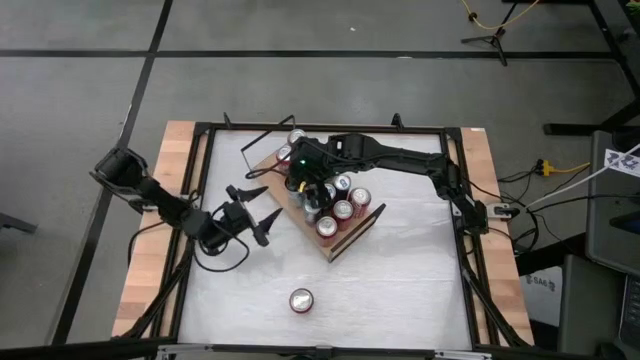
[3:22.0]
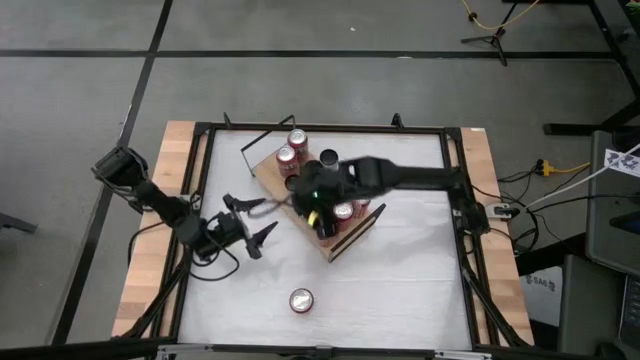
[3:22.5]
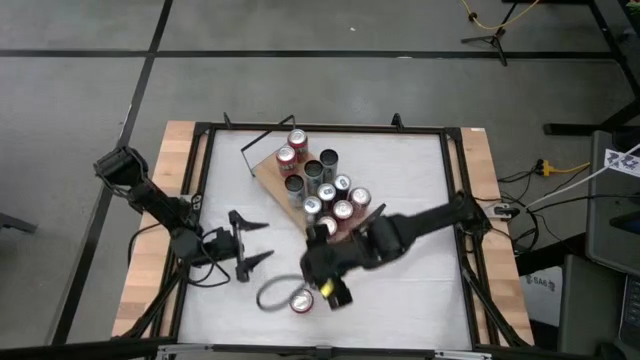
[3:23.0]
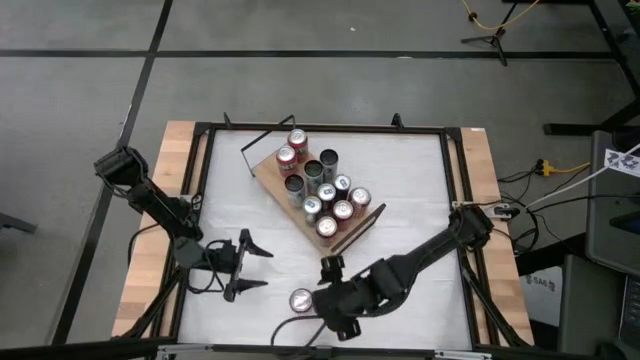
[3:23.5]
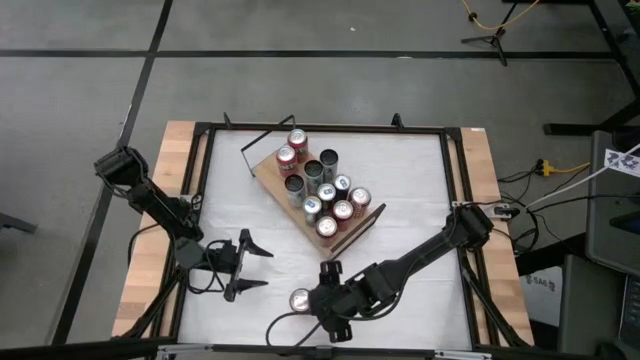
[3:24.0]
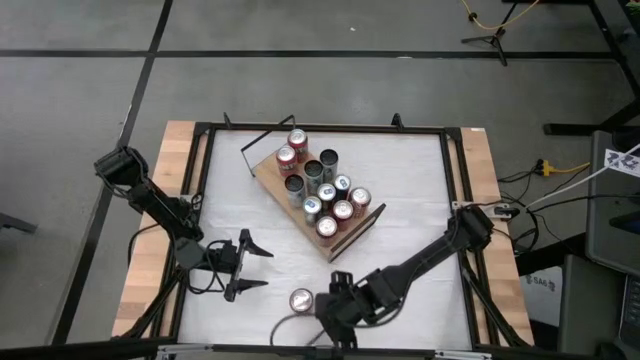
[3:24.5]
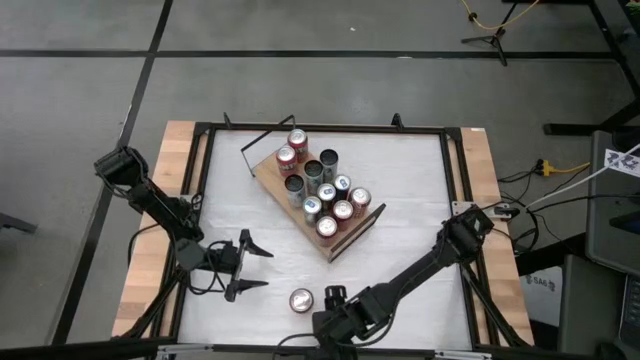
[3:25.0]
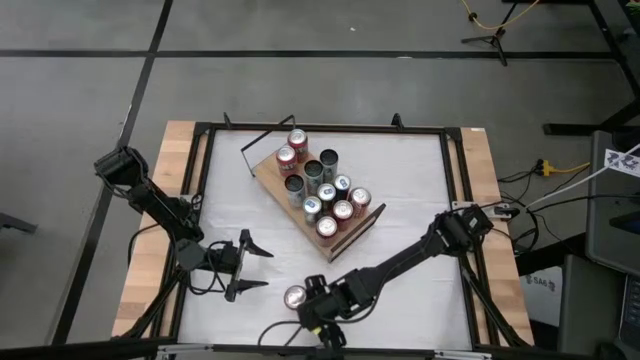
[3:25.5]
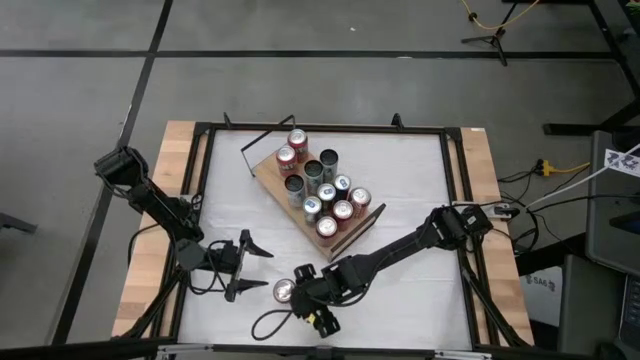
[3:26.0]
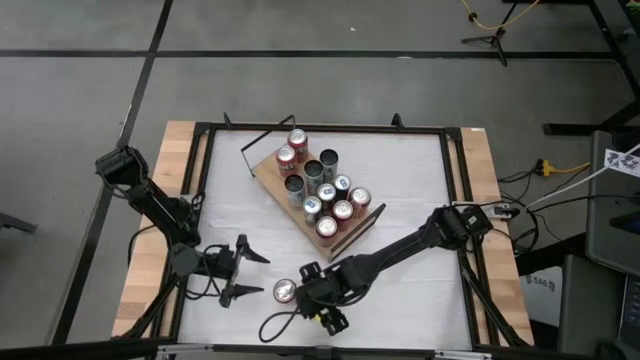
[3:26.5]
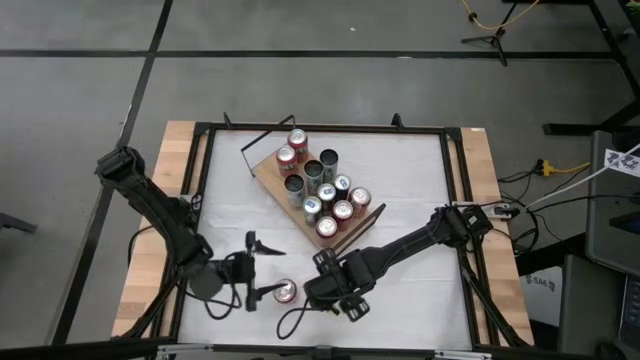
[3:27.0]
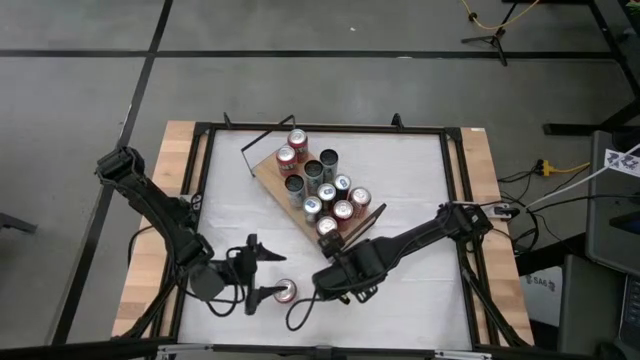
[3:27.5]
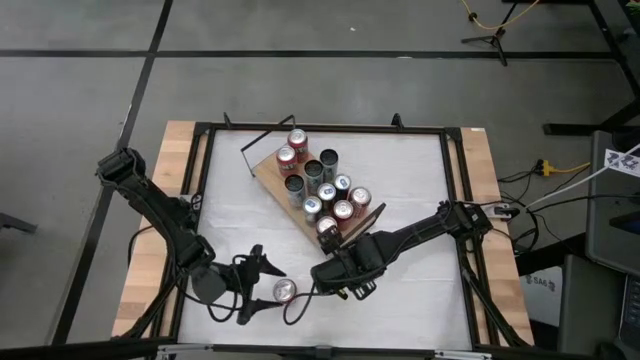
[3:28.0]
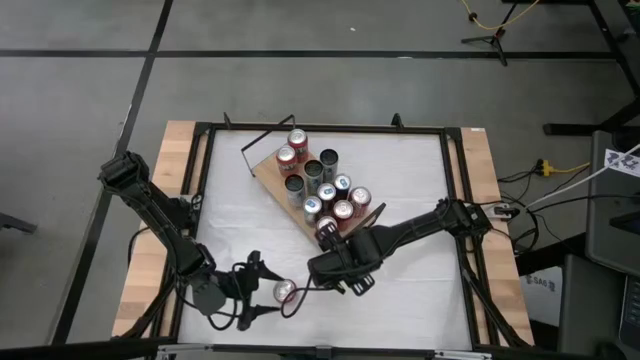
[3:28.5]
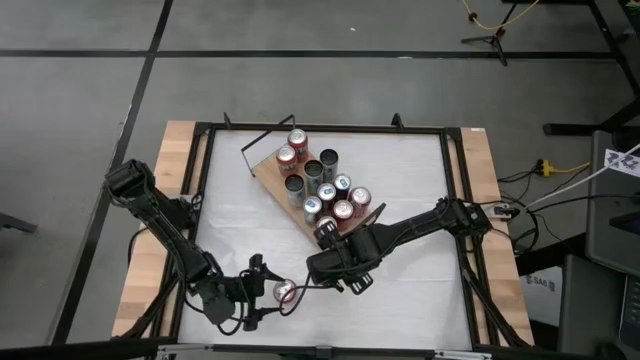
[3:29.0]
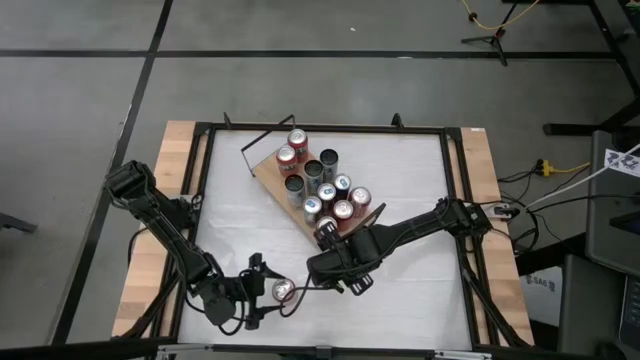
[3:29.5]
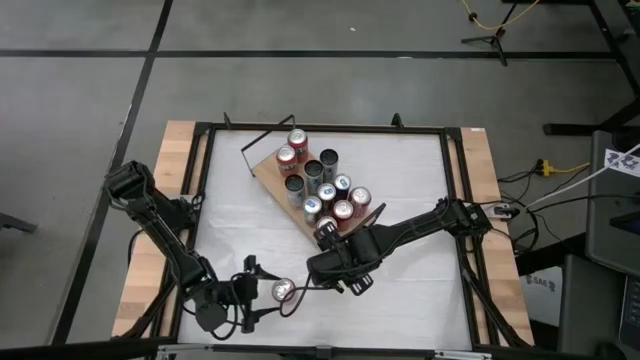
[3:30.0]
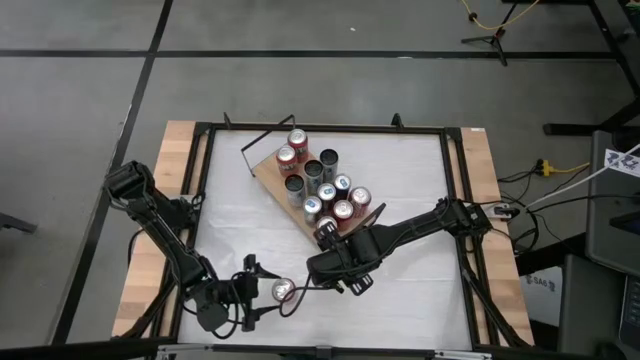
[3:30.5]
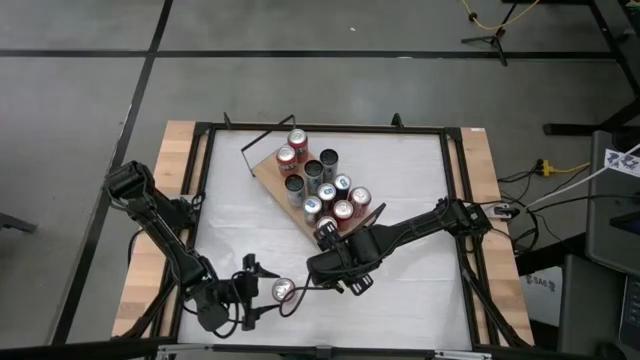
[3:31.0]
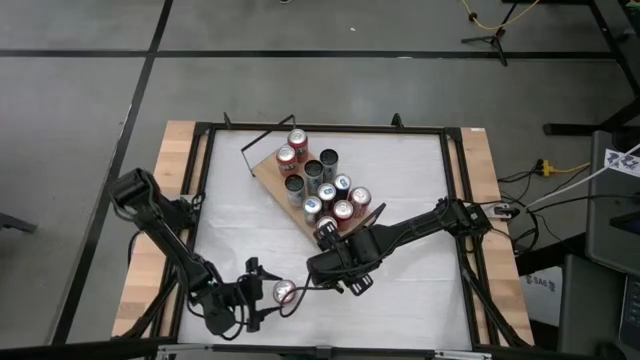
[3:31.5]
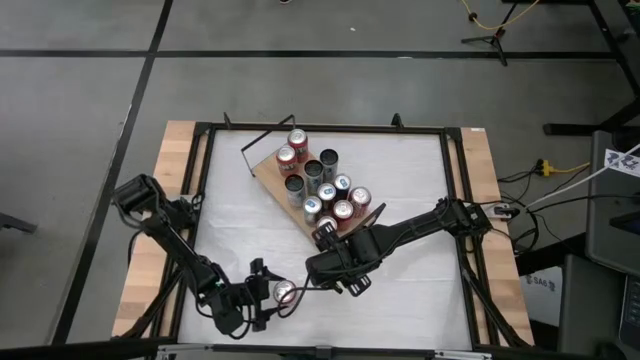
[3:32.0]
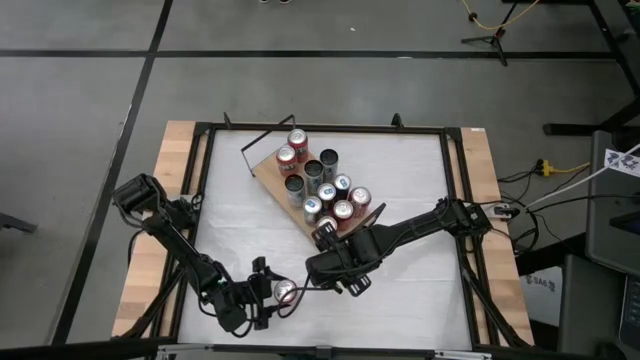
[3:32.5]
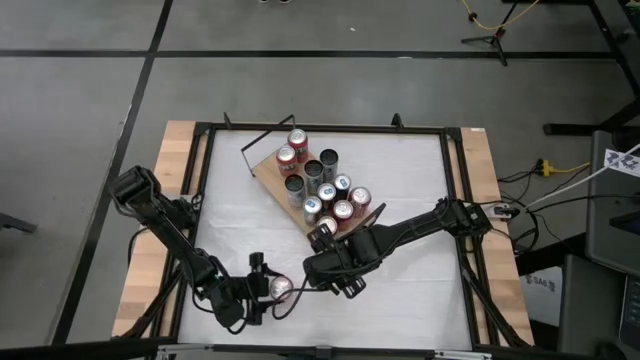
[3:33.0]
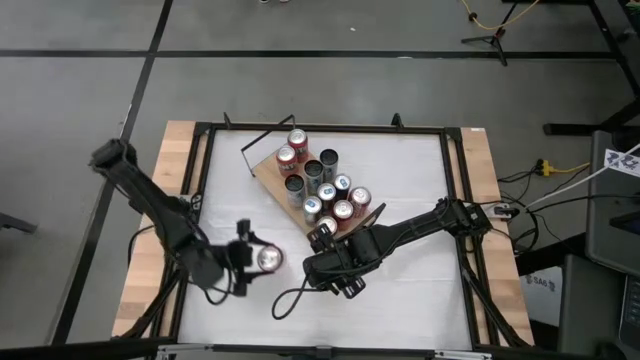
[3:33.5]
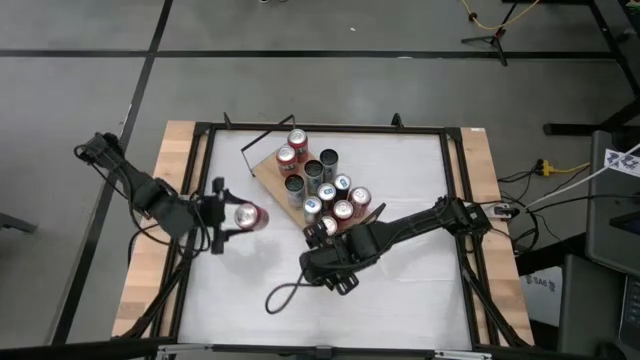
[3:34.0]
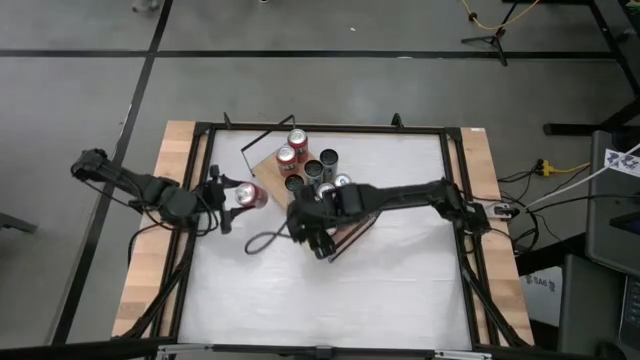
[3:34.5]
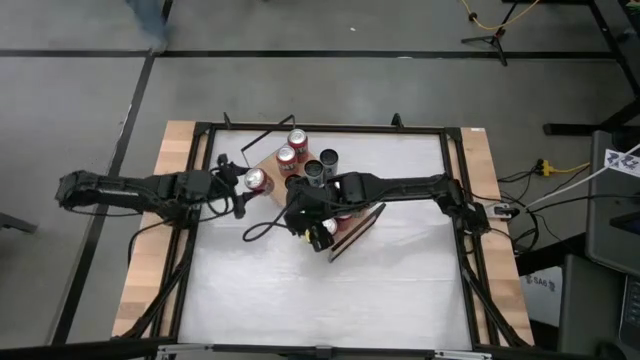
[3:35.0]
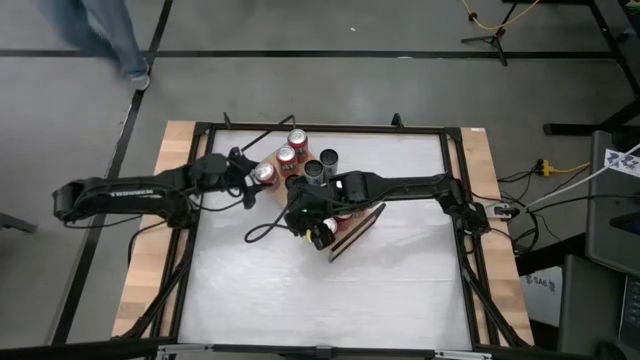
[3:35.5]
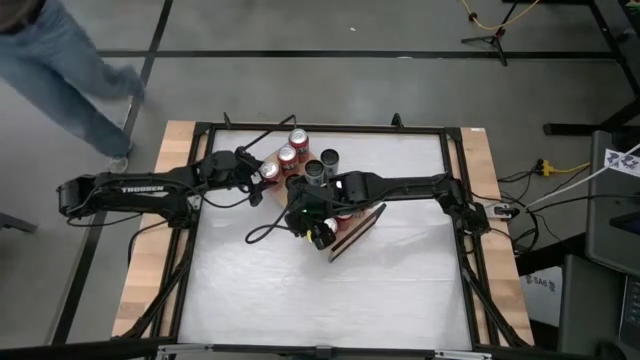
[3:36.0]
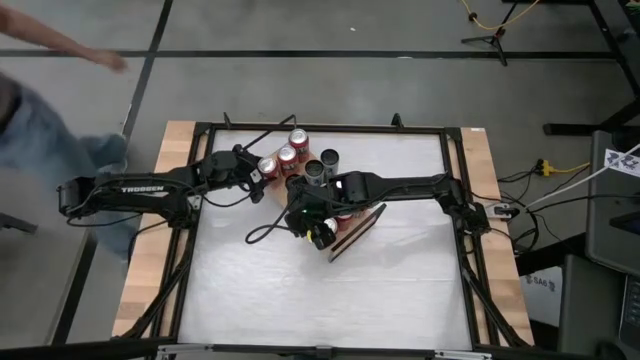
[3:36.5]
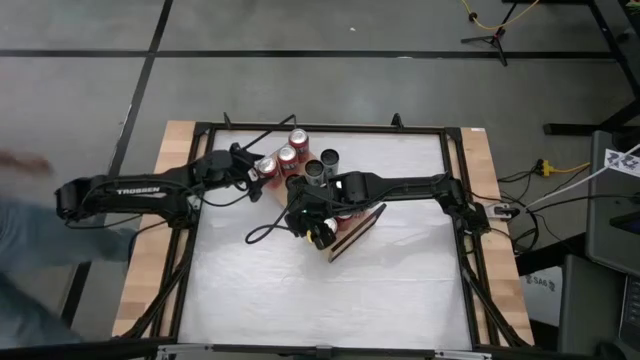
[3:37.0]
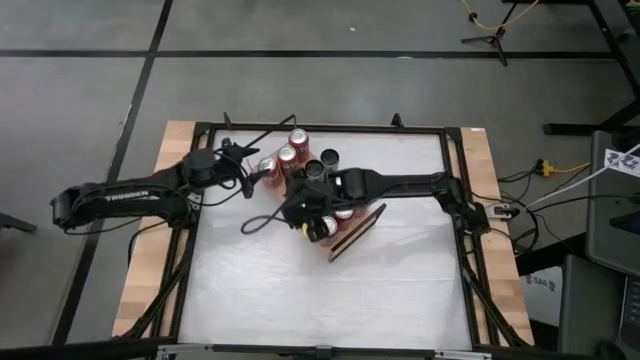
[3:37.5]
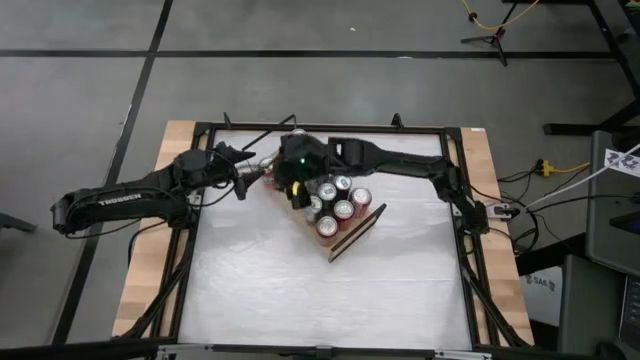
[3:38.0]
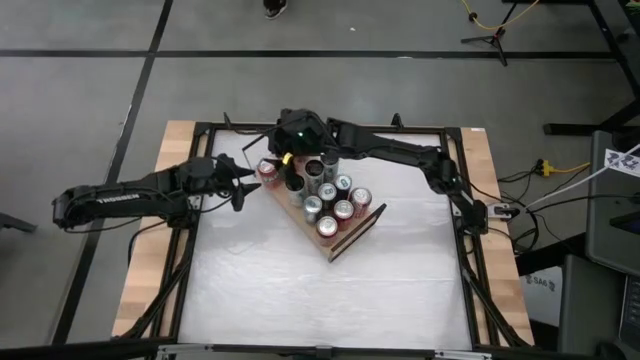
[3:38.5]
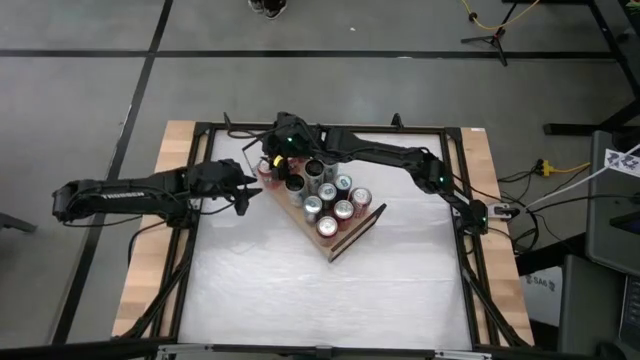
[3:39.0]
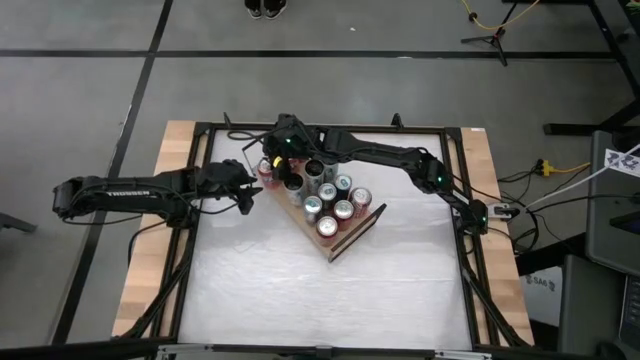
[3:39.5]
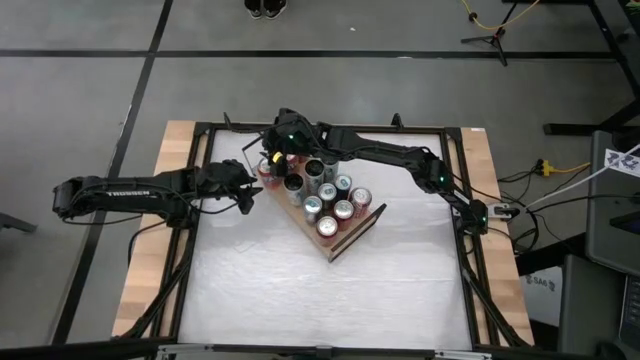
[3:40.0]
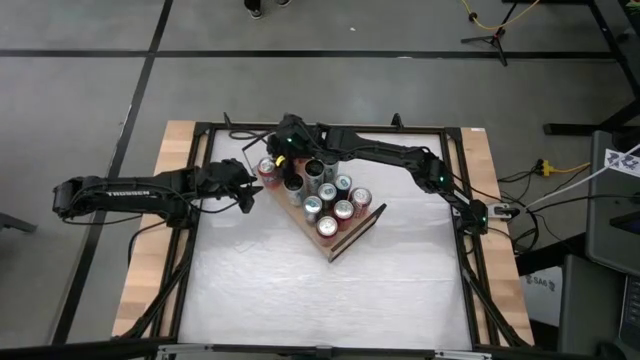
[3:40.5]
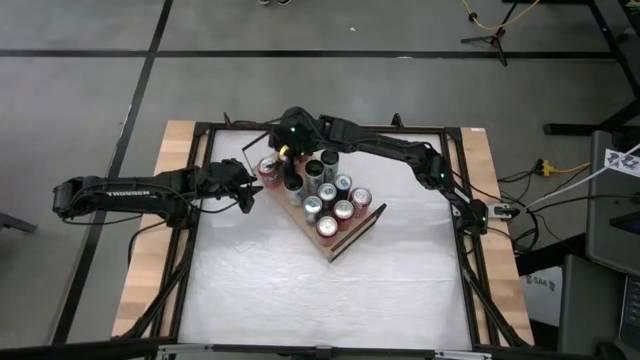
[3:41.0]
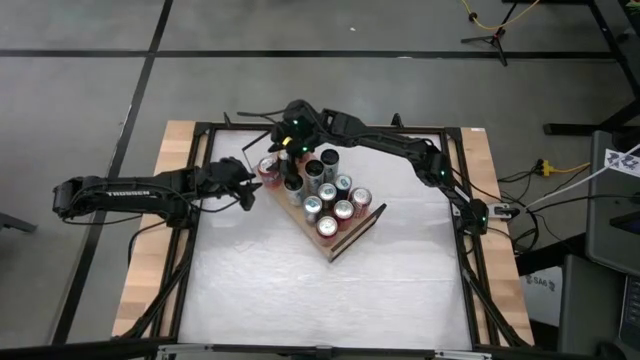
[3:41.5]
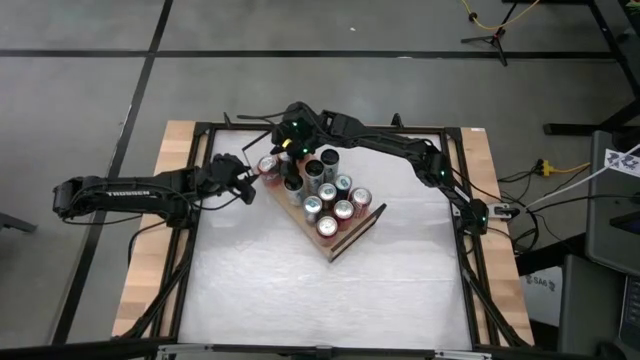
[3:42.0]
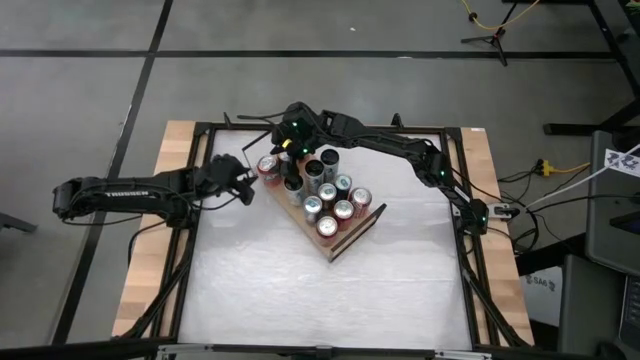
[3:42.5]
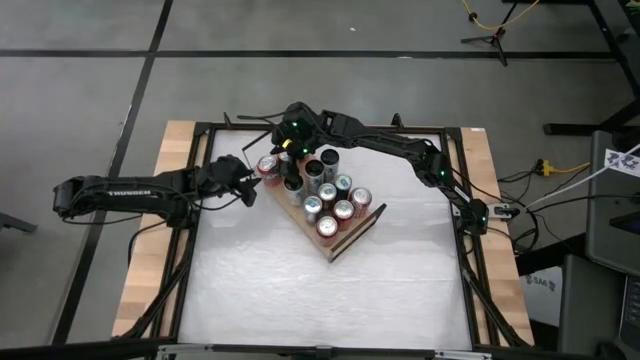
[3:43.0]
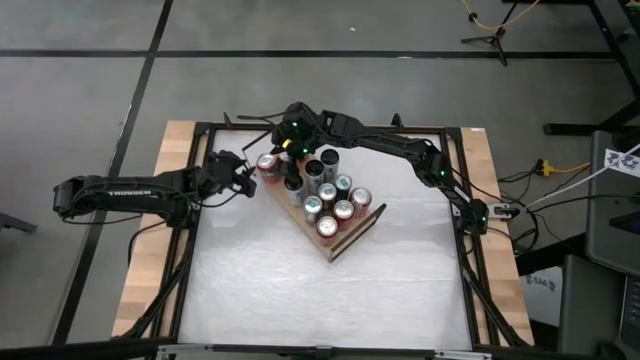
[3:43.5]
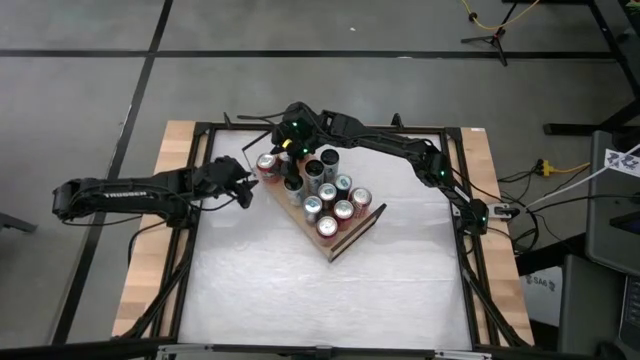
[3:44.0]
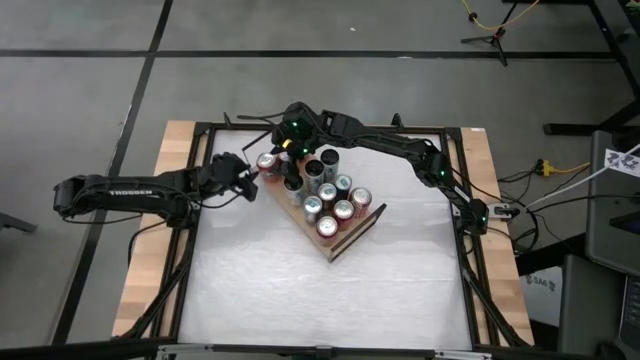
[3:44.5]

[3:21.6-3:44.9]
Task: Place canned beverage on shelf
Put the red soda can on the shelf aligned with the other red soda cans
